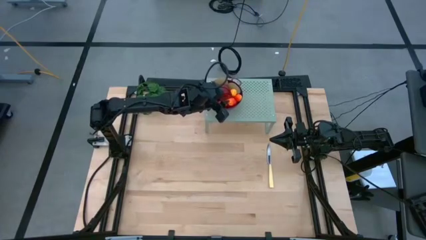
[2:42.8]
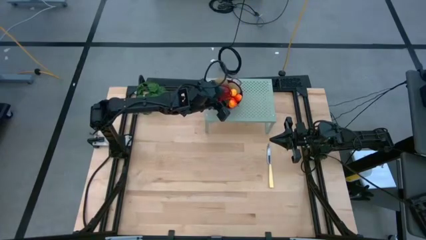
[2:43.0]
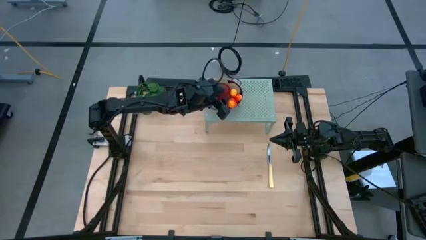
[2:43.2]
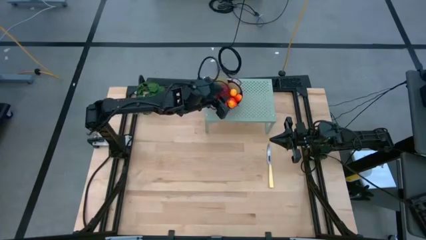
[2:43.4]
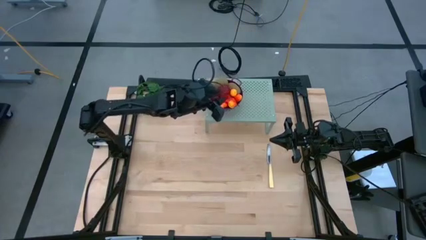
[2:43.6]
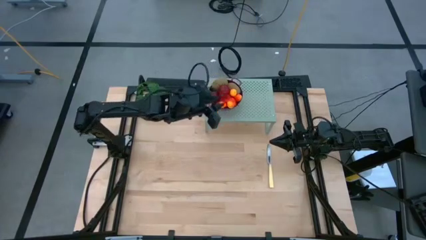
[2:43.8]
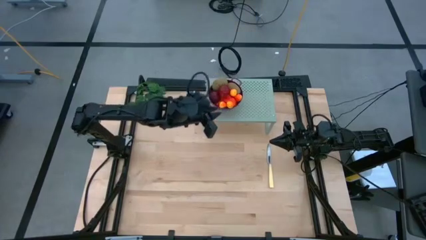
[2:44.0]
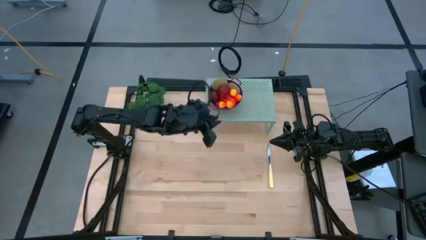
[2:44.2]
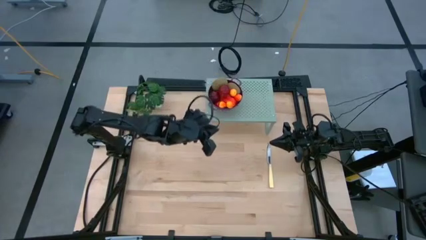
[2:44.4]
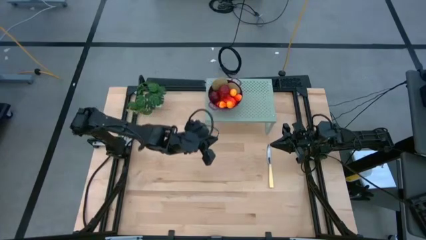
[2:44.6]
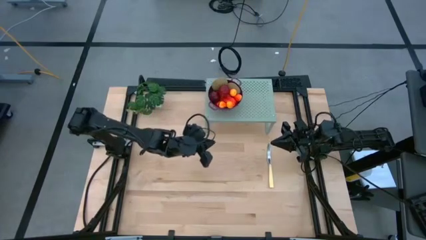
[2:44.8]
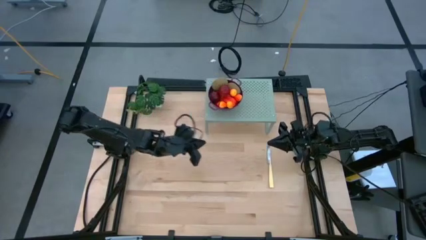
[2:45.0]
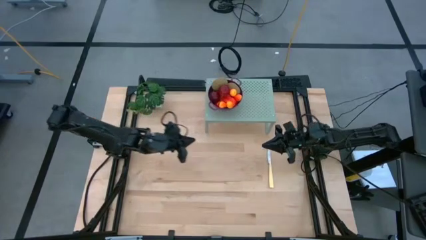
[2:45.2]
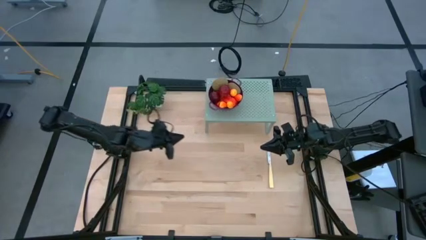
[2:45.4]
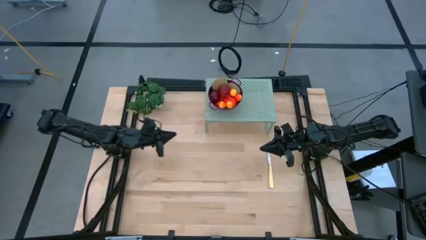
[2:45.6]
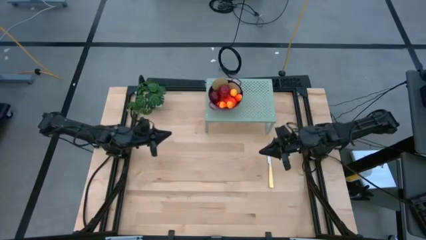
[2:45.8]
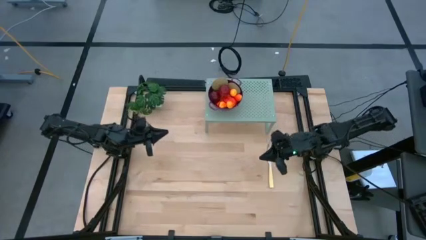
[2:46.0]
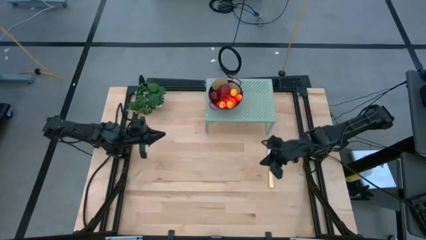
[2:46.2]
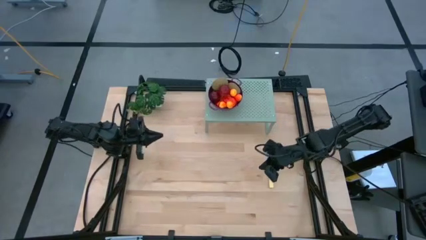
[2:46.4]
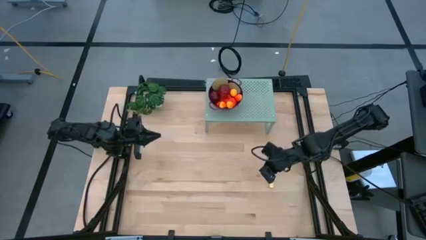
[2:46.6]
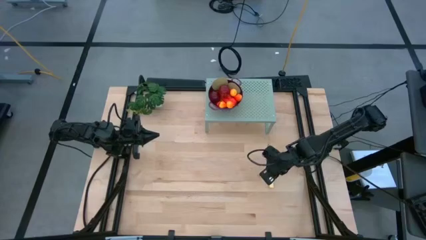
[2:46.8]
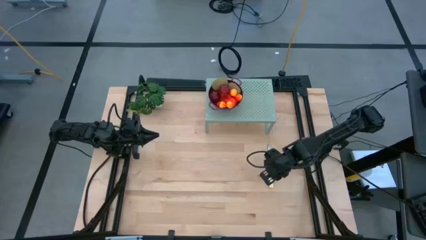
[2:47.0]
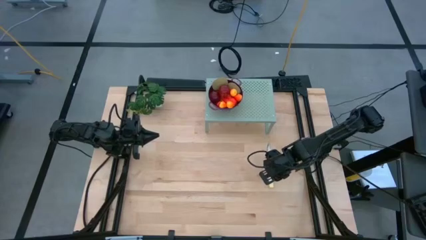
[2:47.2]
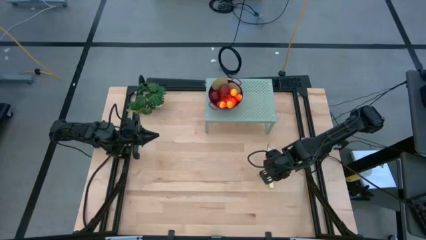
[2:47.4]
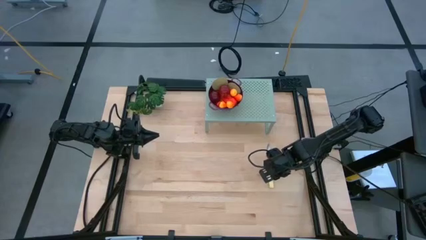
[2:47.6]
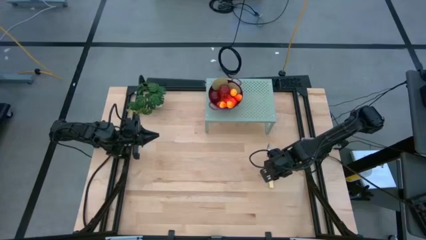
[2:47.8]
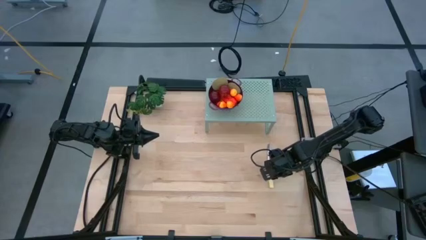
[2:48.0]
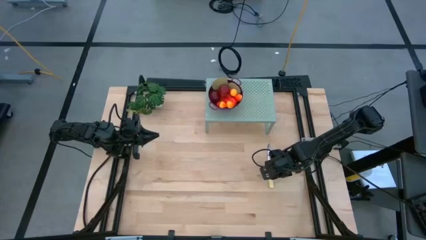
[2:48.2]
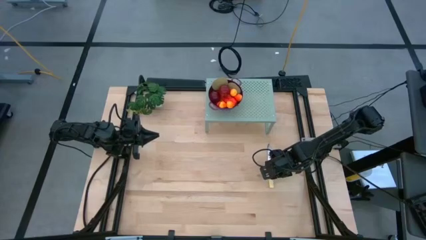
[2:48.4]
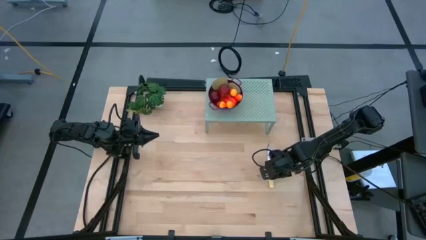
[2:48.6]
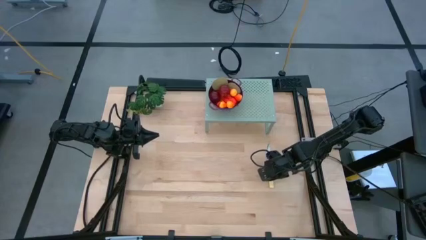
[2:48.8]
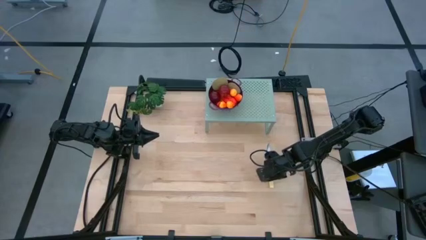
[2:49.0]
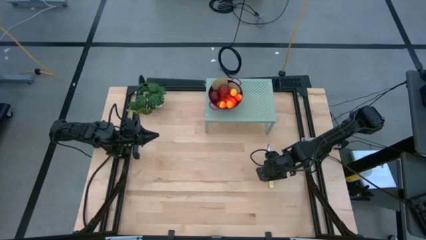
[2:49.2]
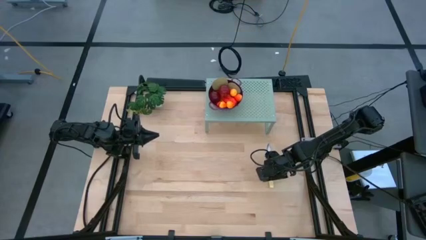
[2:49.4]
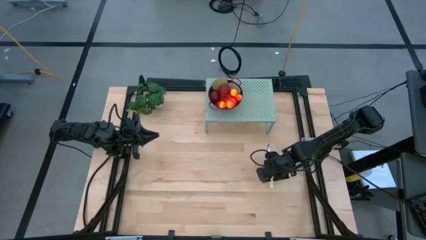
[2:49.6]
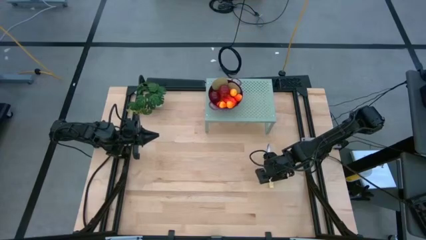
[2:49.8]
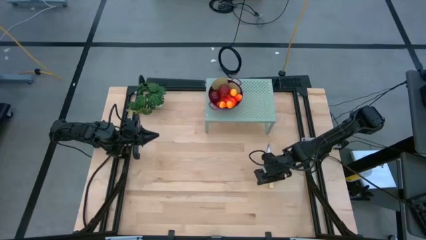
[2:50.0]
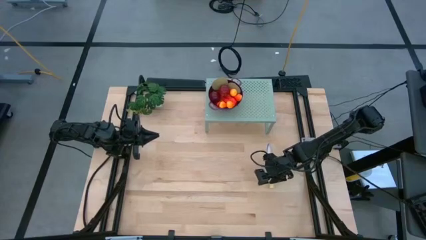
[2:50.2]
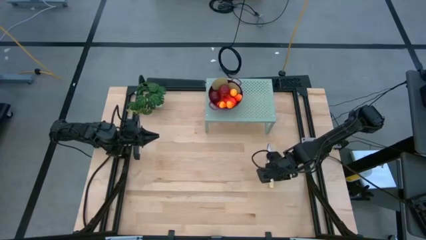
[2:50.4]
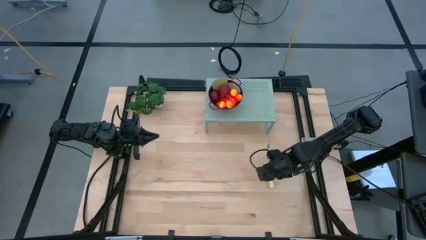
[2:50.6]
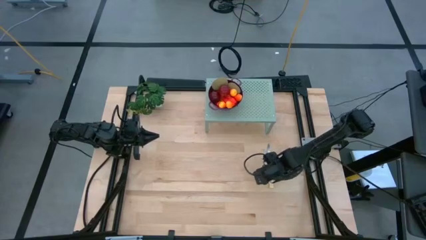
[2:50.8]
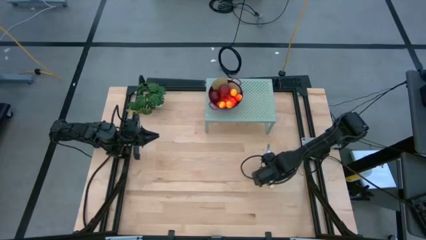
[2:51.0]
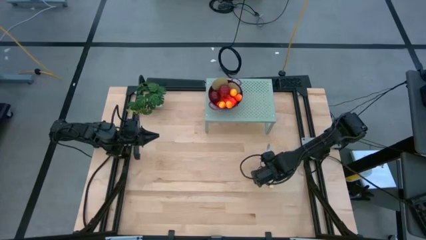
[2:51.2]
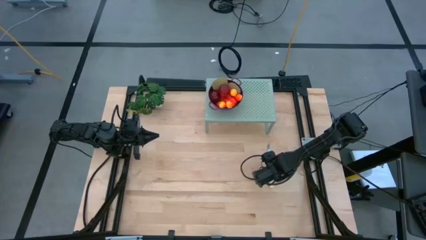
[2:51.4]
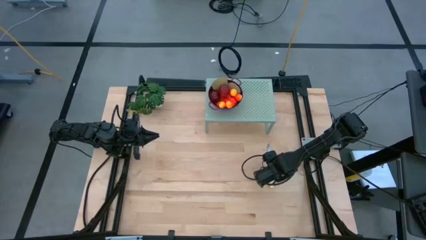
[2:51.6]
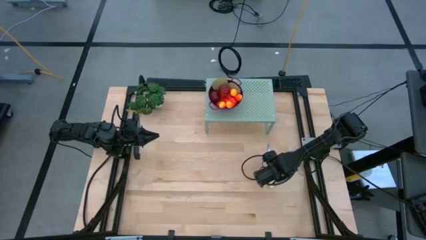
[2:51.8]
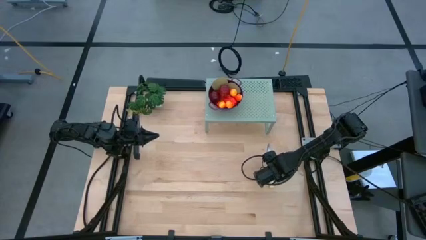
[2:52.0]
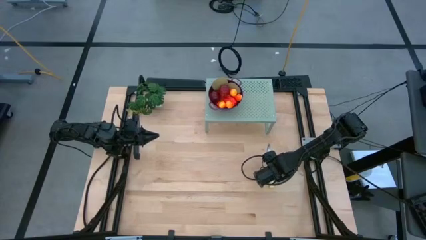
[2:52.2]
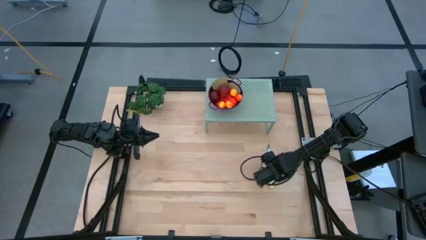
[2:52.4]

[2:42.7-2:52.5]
Task: Pick & Place Fruit
Put the yellow knife on the shelf

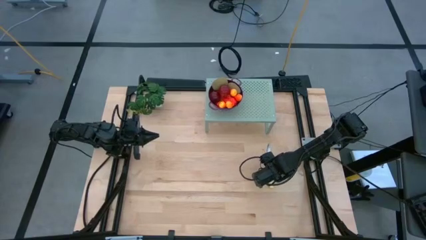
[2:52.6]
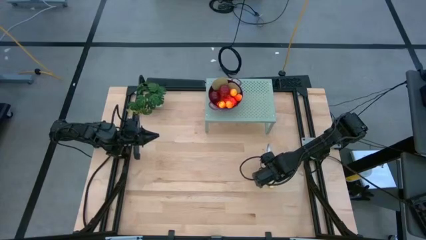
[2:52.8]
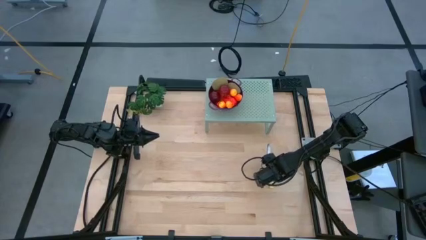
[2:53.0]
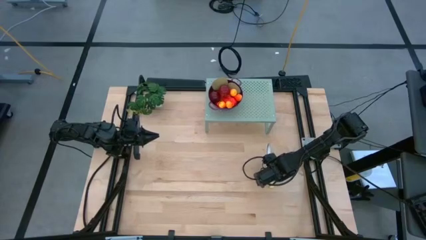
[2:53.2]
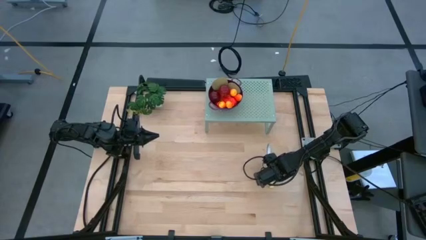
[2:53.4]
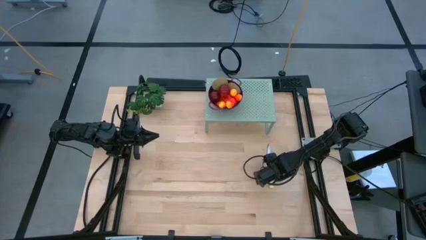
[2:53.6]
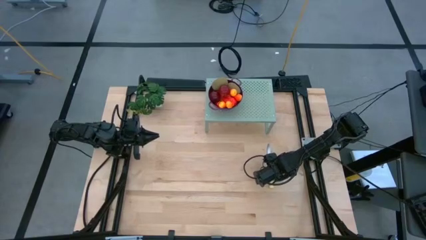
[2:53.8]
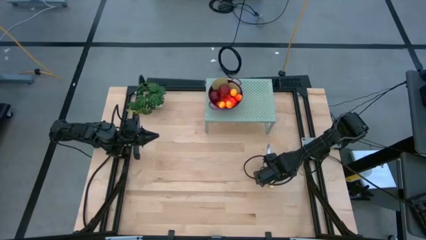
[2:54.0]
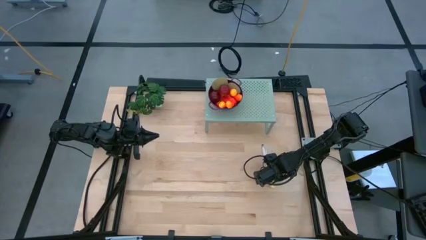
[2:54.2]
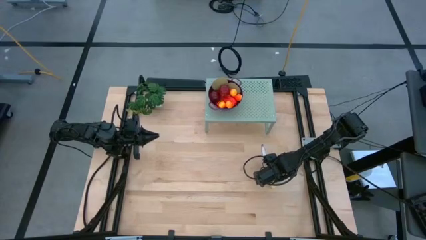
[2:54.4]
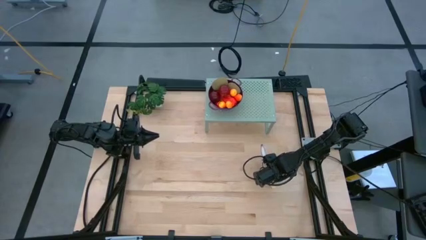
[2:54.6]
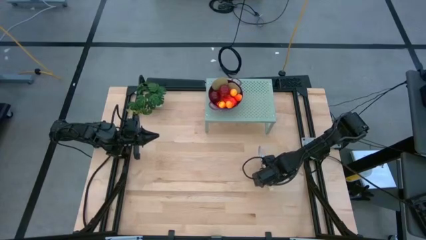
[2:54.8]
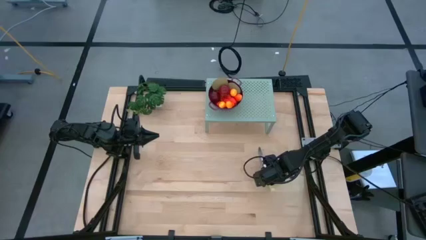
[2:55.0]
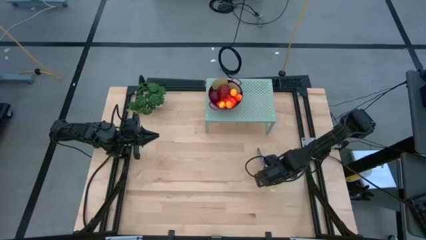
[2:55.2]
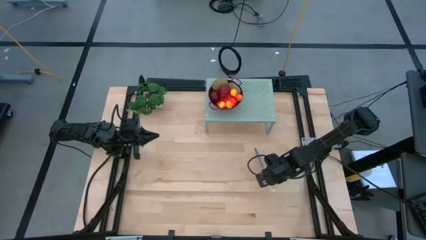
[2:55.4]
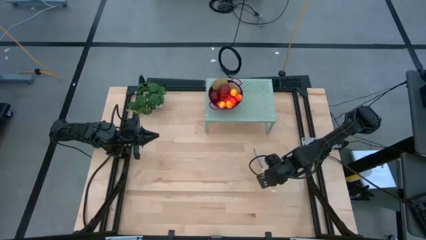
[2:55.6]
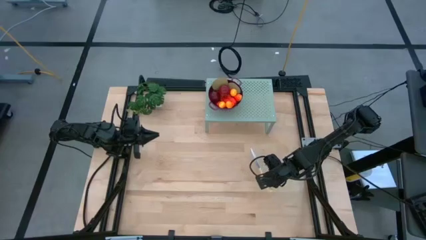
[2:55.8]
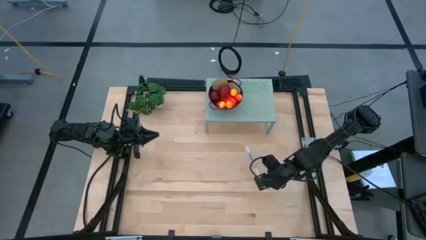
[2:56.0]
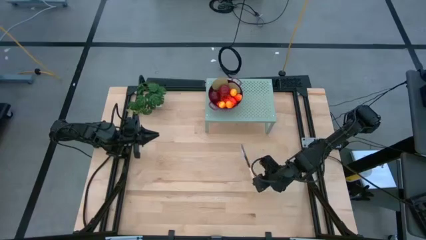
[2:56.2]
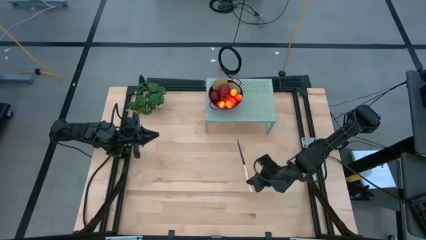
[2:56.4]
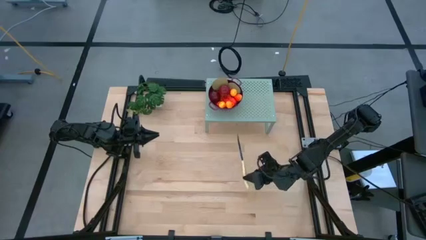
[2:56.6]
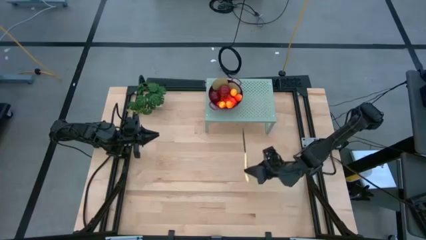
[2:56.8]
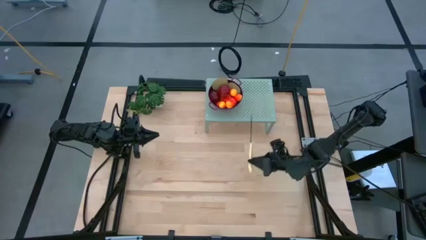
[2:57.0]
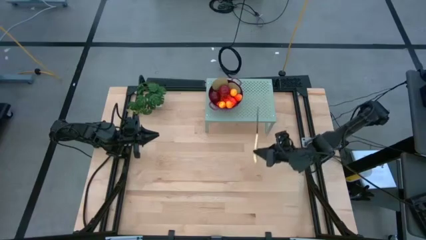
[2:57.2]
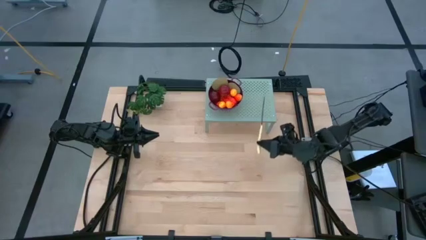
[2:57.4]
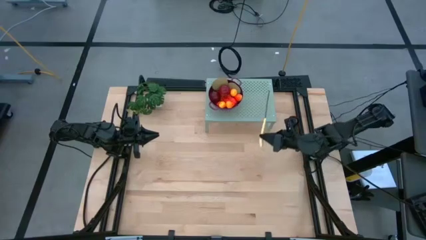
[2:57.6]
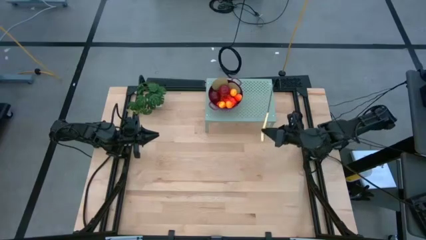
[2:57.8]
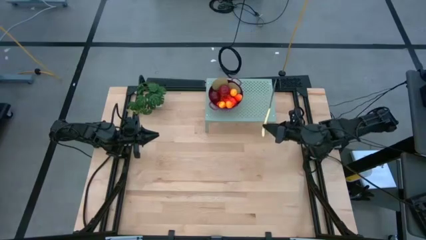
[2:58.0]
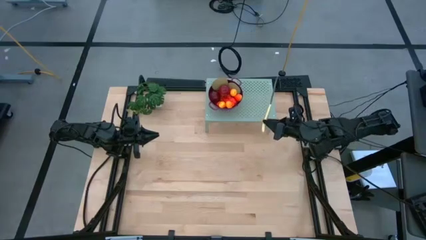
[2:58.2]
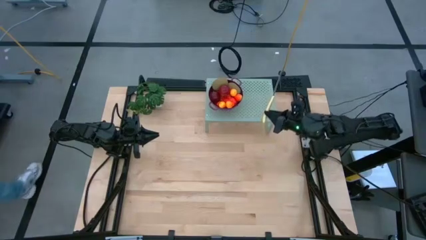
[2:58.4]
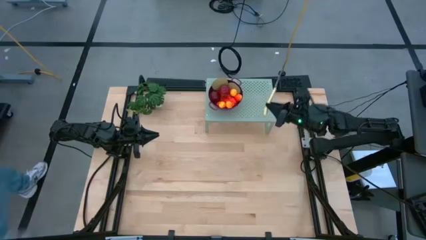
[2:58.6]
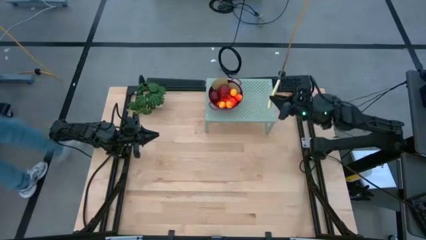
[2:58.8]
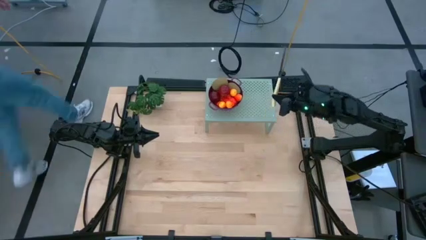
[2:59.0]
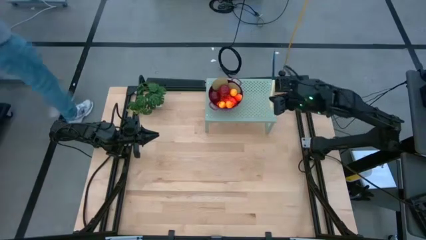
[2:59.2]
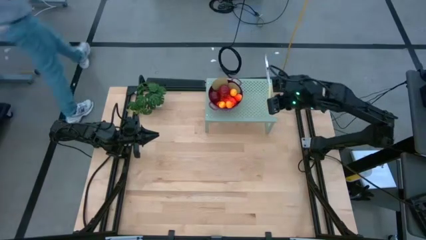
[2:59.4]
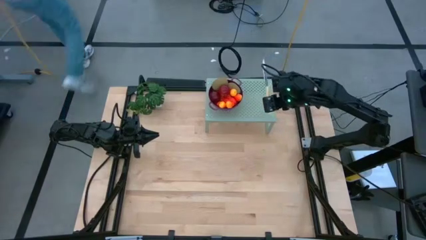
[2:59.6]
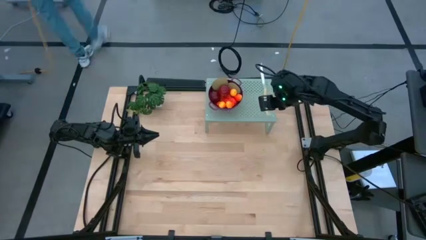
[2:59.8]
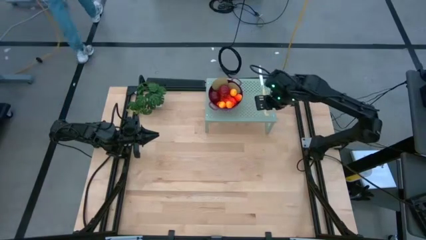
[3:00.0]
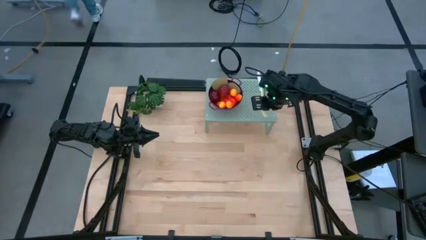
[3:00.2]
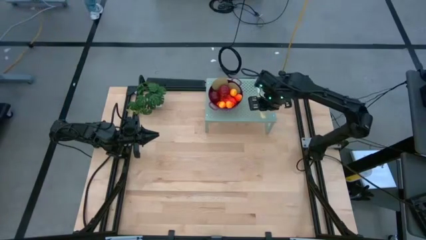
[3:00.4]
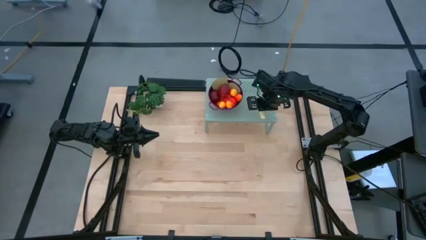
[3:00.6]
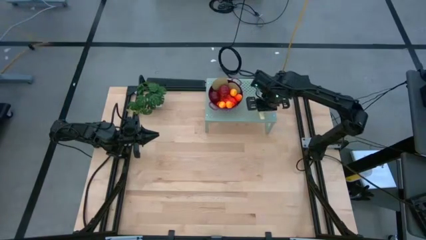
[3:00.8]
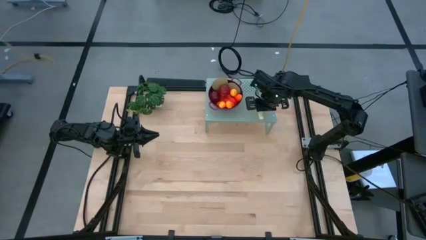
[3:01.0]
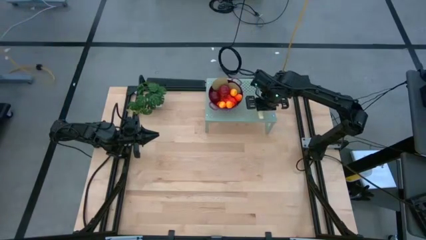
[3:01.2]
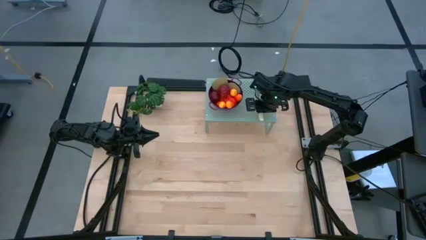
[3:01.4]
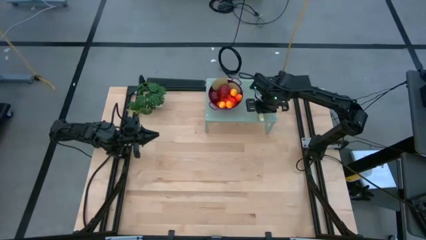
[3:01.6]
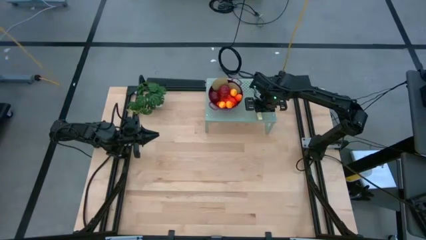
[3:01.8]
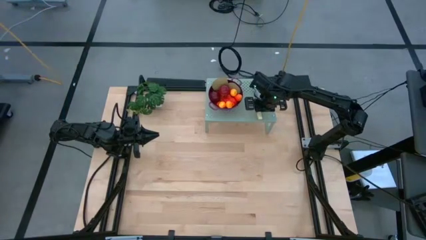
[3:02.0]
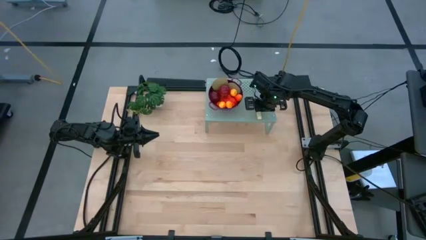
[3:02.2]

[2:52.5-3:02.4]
Put the yellow knife on the shelf
